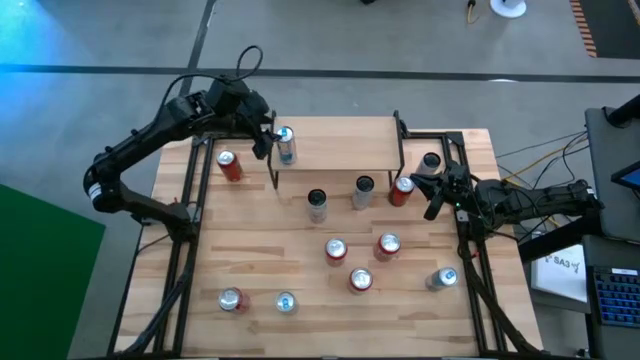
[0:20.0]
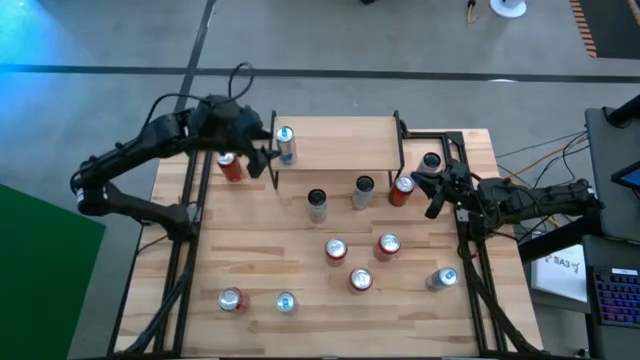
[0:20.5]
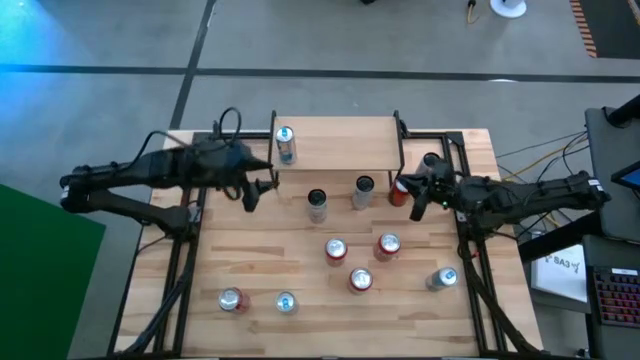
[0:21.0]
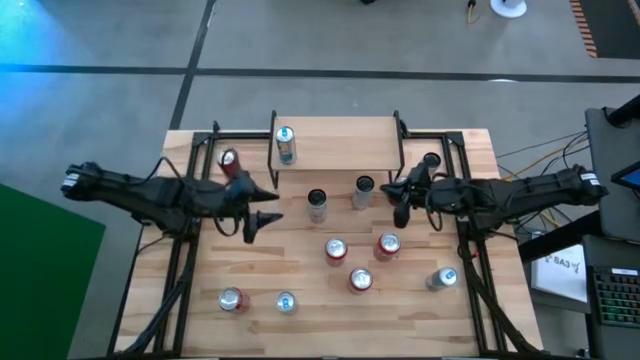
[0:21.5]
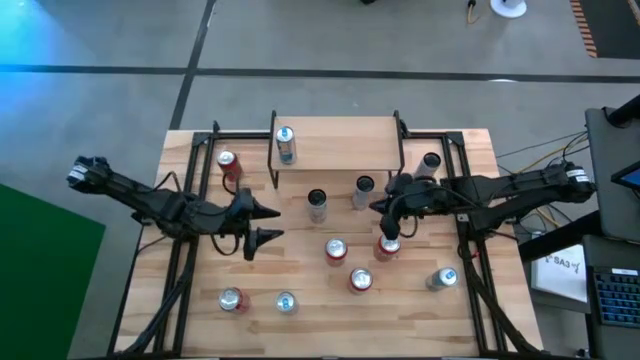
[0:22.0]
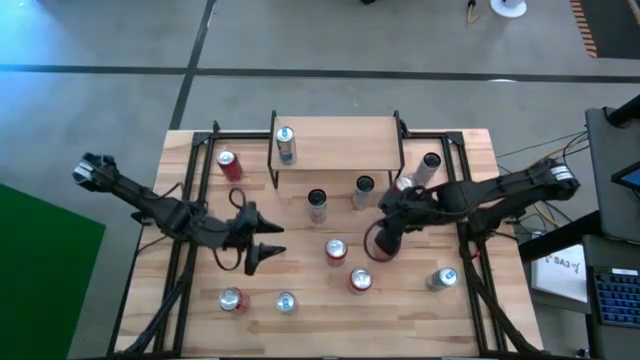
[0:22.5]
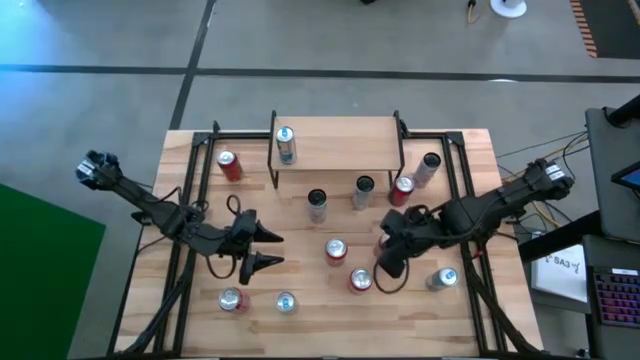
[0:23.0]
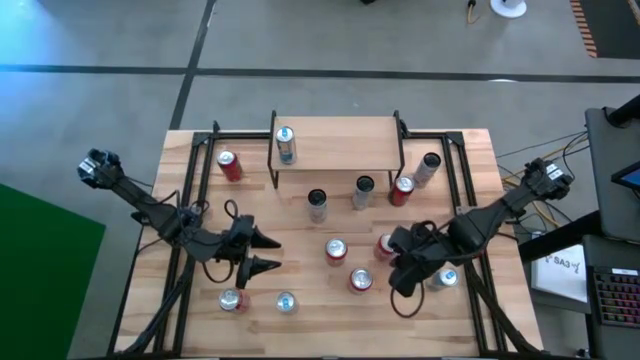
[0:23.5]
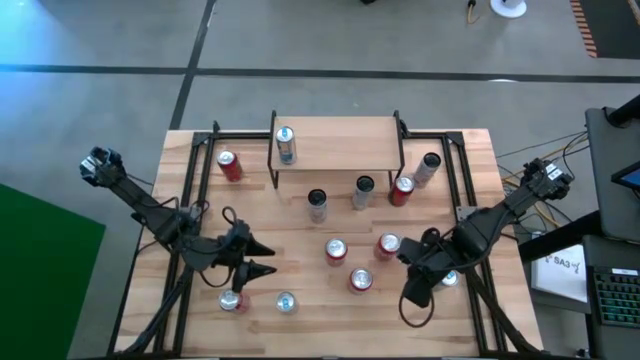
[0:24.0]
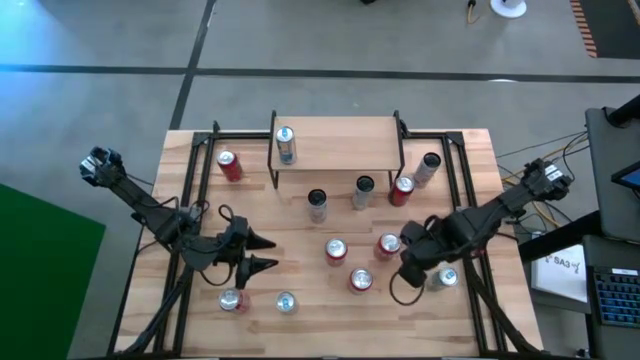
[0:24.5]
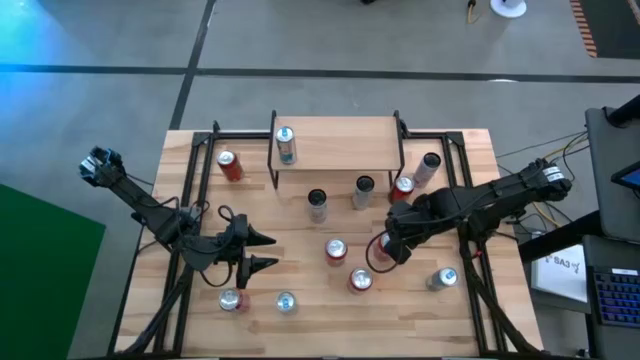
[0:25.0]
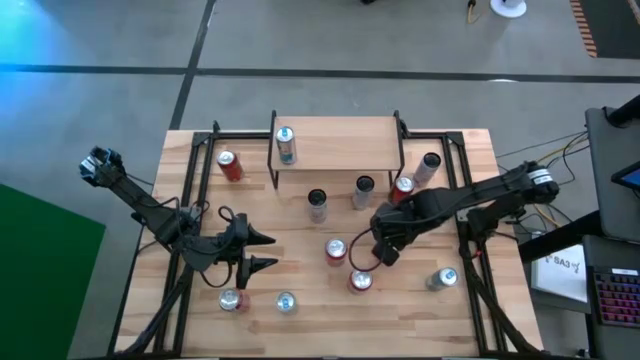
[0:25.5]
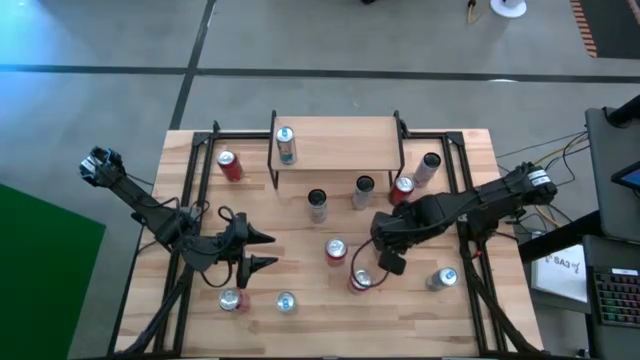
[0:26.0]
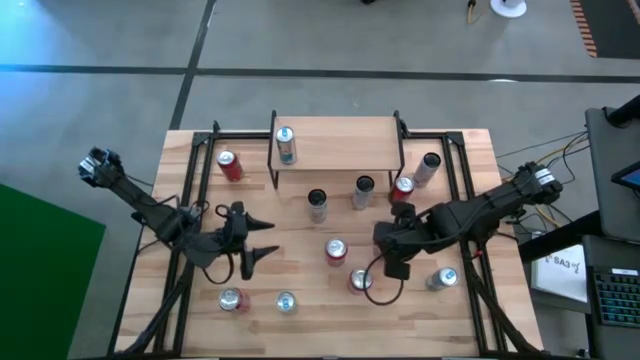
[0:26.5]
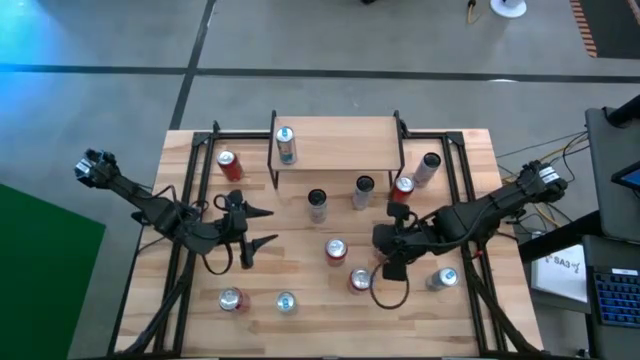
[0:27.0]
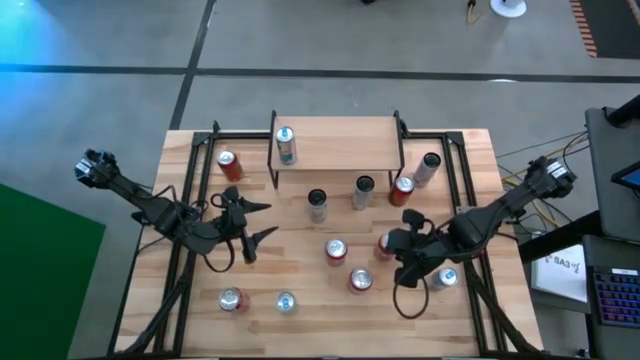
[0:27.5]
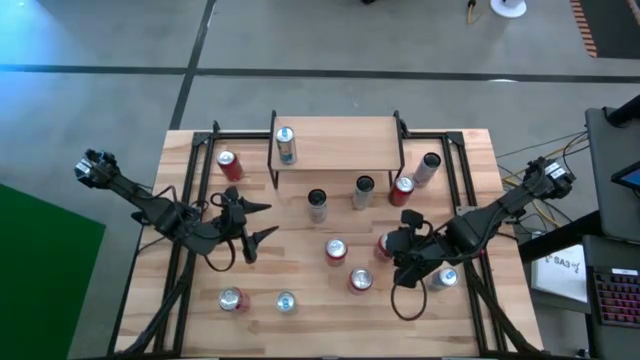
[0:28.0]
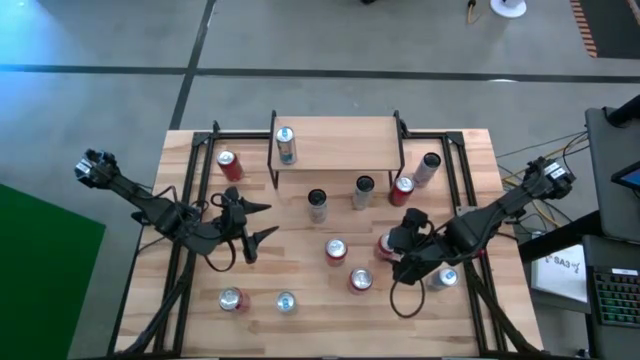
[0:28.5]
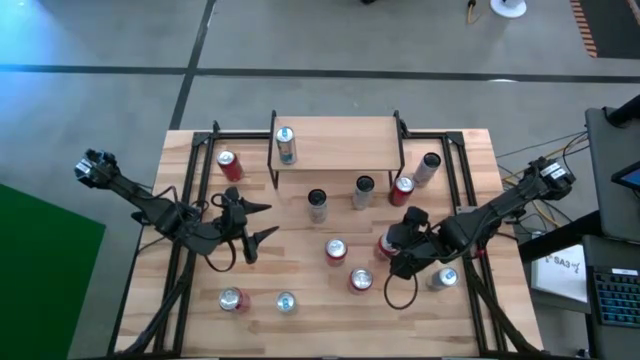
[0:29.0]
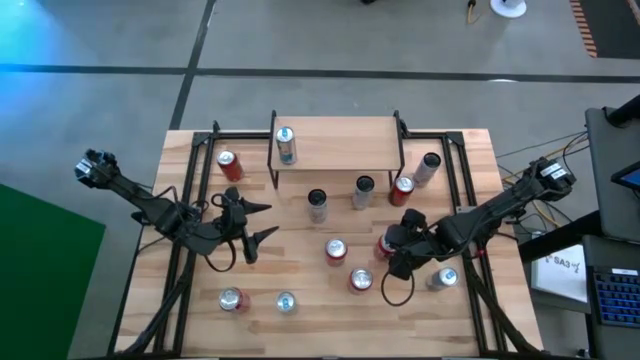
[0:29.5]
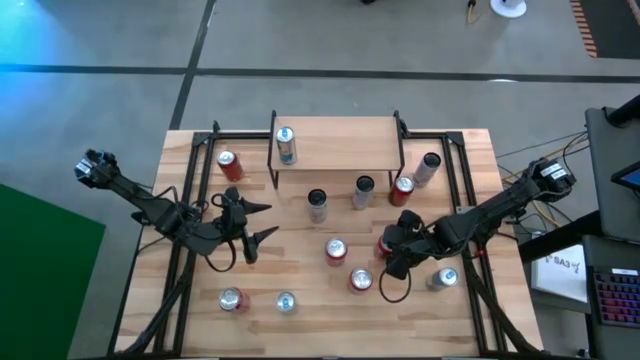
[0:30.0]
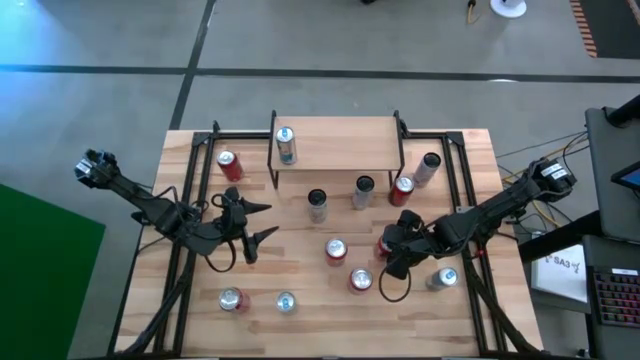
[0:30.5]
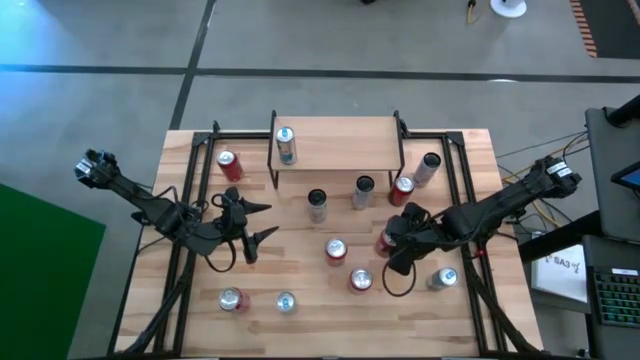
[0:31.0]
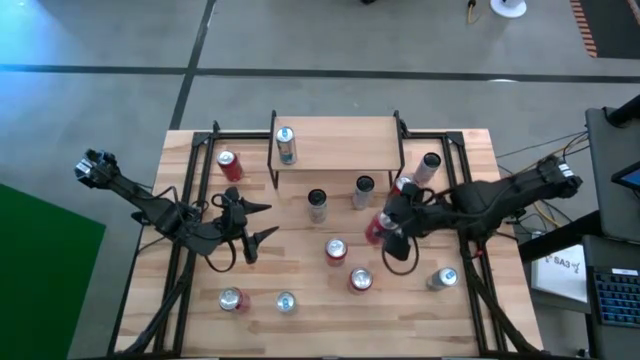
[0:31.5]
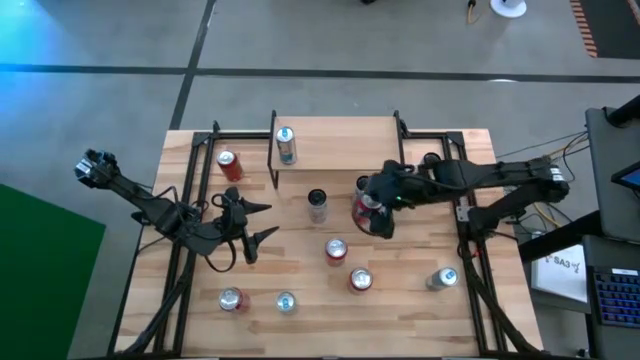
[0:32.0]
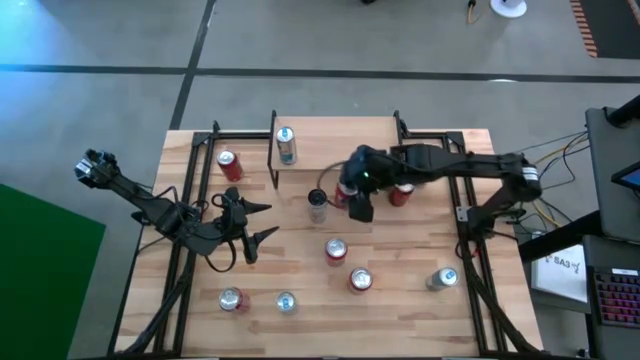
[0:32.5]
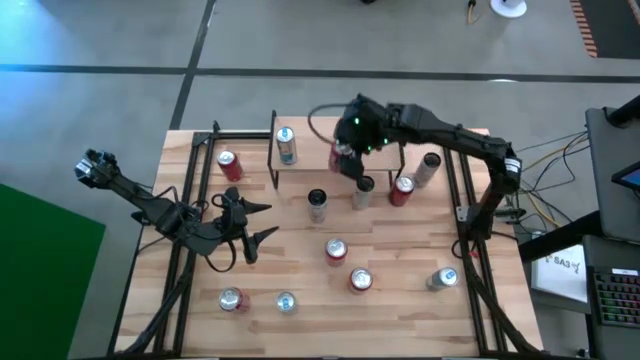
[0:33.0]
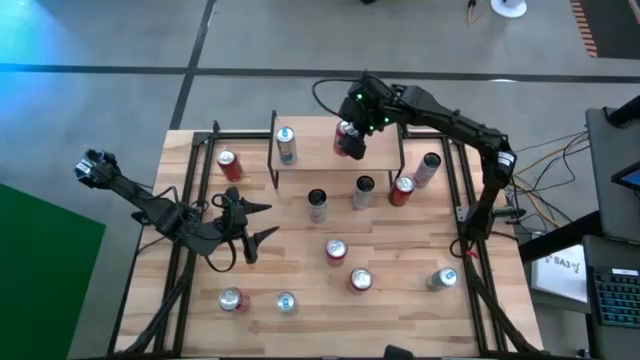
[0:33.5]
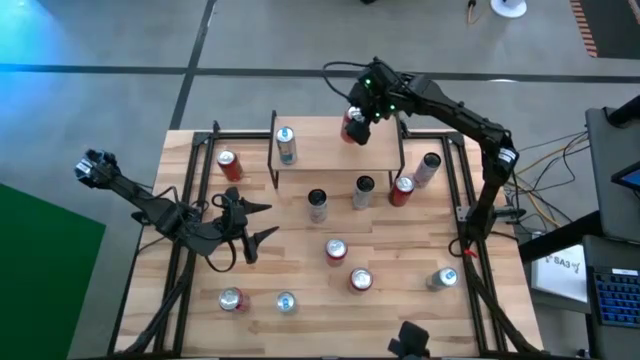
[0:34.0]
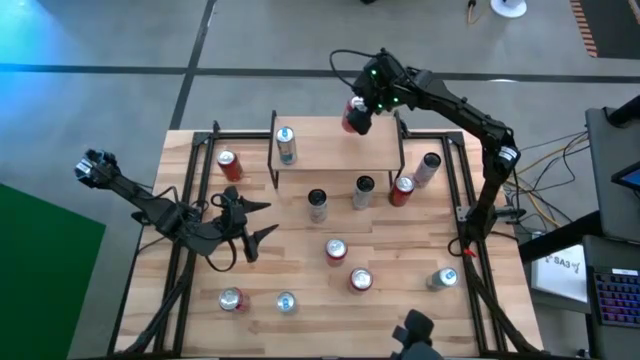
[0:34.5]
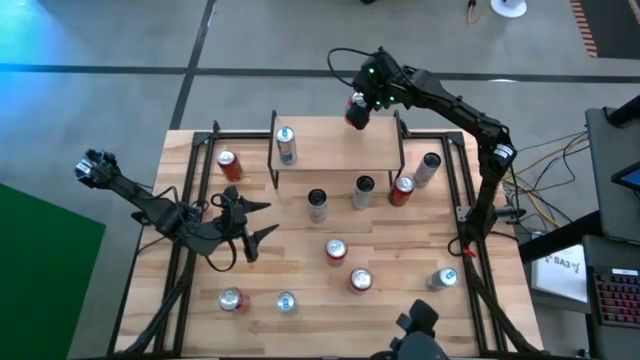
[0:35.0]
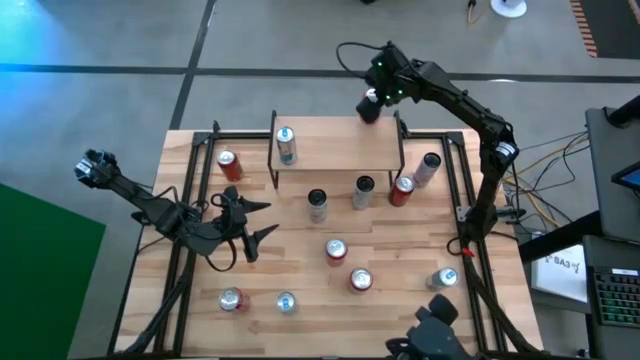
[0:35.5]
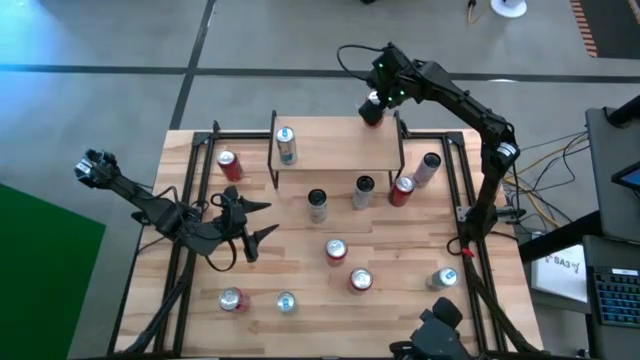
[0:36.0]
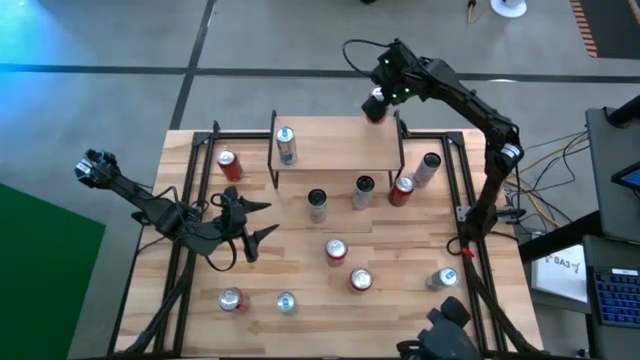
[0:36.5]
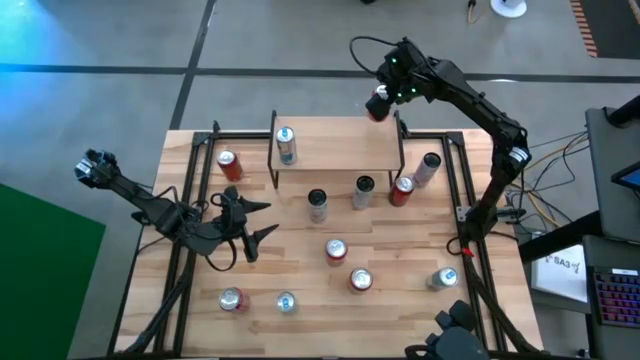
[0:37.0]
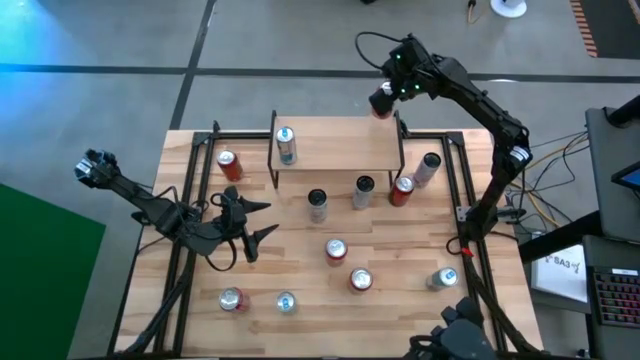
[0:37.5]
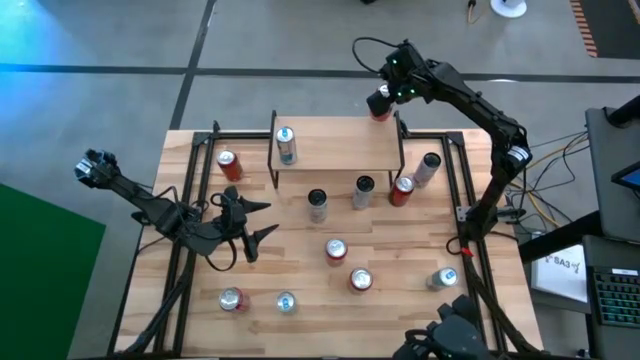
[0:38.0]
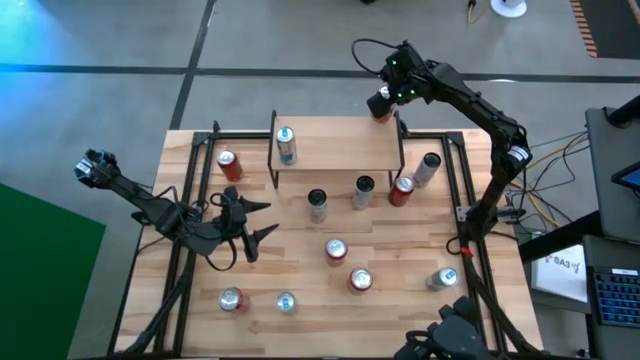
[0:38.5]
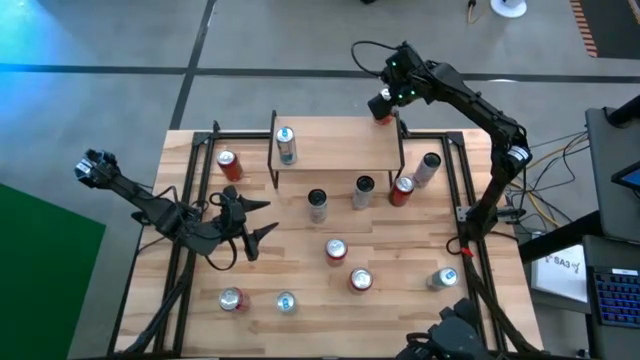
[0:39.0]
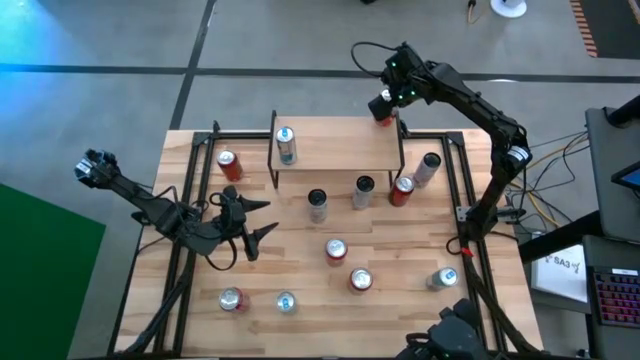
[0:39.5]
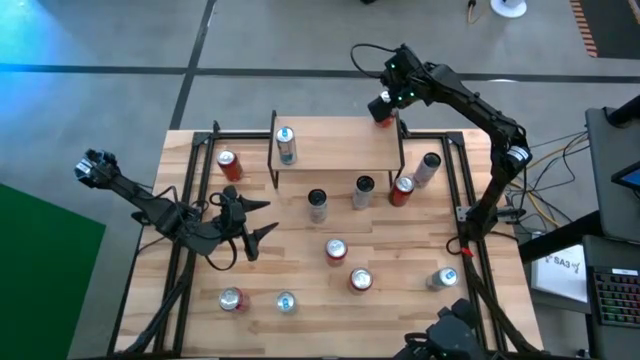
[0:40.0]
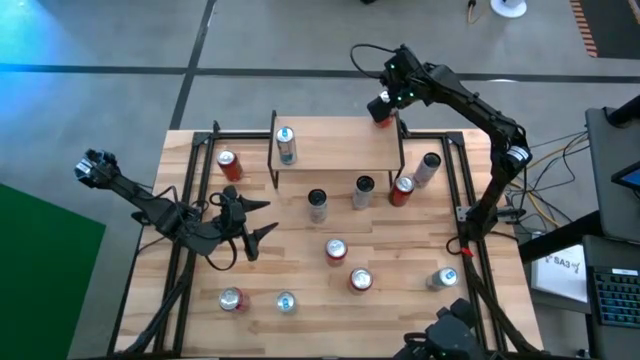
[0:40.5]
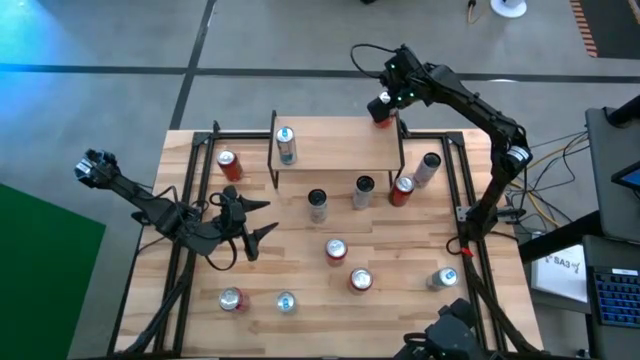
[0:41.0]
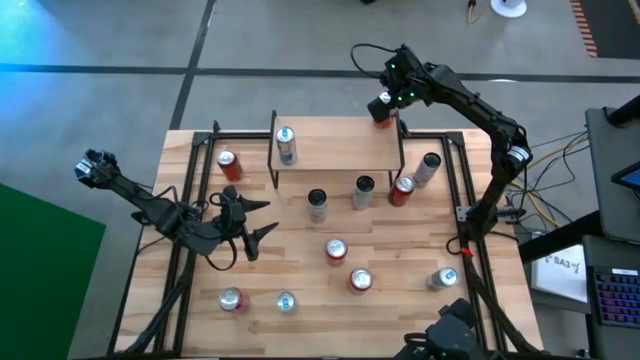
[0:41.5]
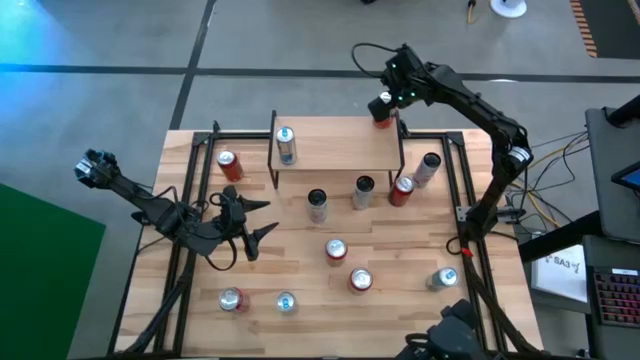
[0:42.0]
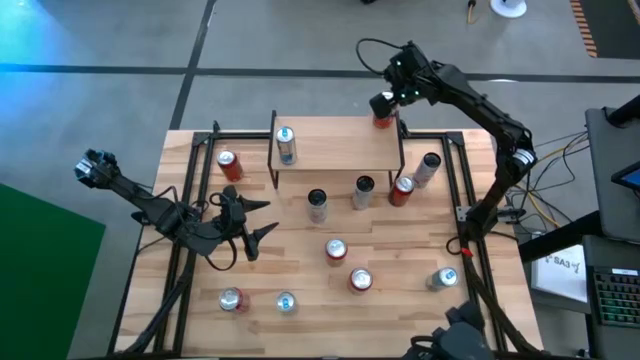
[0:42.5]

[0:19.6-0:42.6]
Task: Place canned beverage on shelf
Put the middle right red soda can on the shelf
